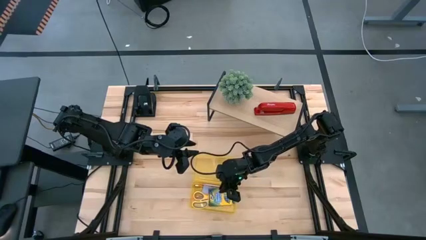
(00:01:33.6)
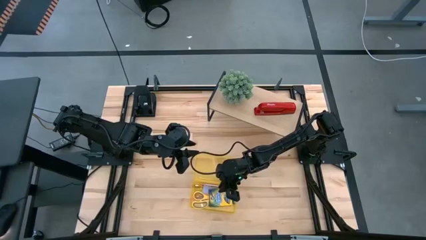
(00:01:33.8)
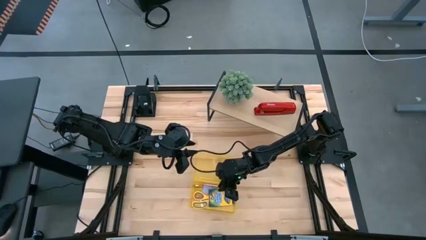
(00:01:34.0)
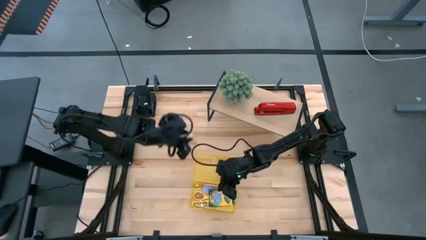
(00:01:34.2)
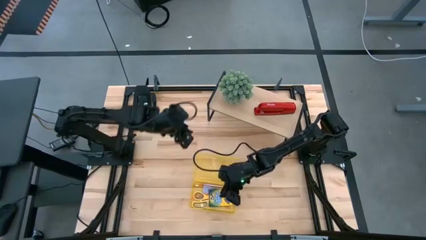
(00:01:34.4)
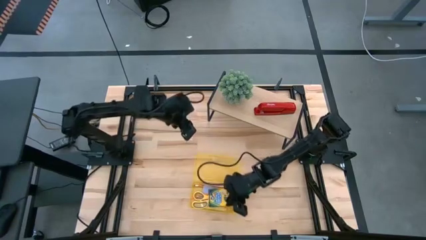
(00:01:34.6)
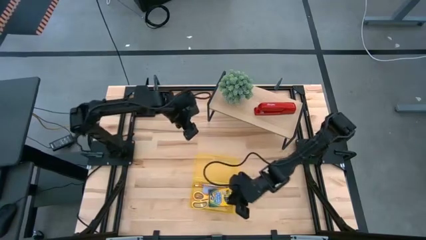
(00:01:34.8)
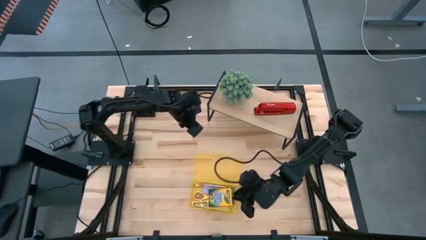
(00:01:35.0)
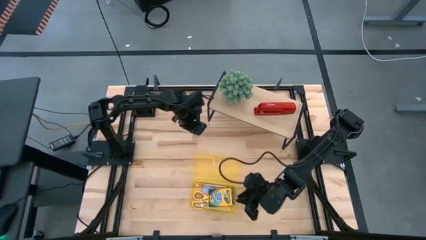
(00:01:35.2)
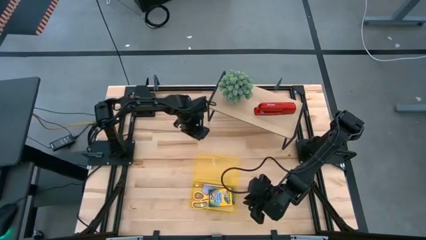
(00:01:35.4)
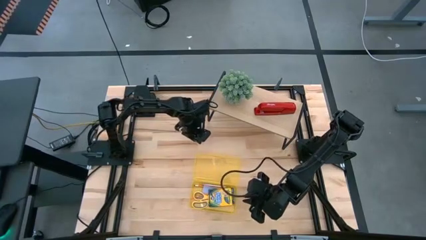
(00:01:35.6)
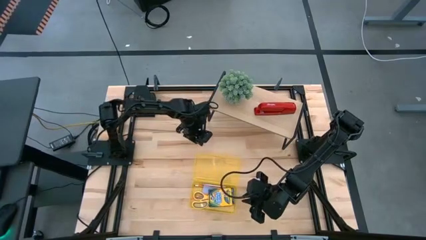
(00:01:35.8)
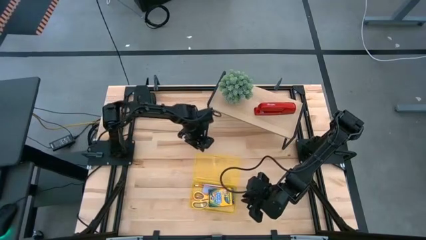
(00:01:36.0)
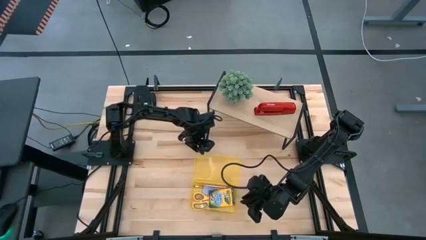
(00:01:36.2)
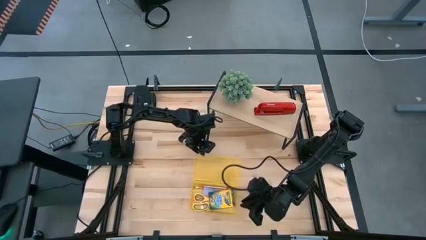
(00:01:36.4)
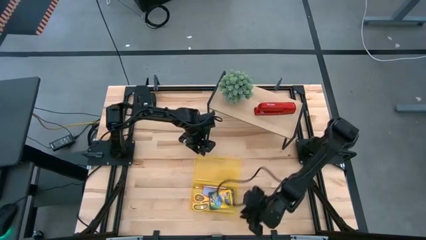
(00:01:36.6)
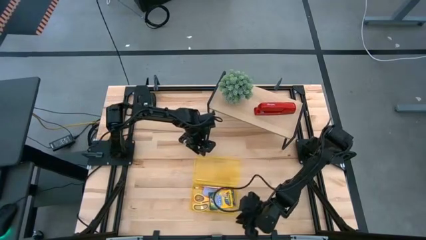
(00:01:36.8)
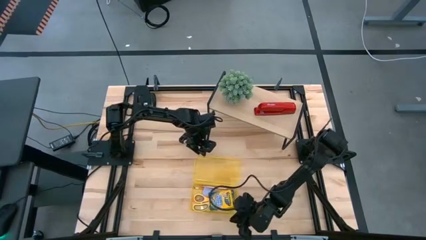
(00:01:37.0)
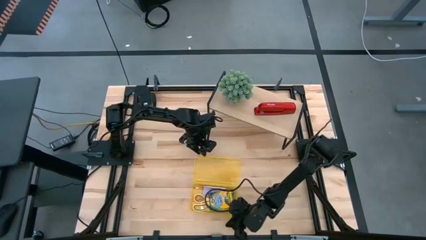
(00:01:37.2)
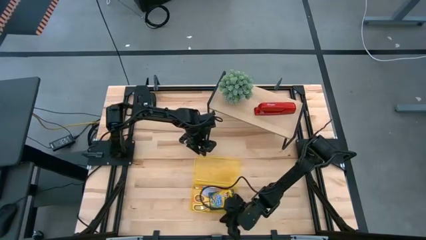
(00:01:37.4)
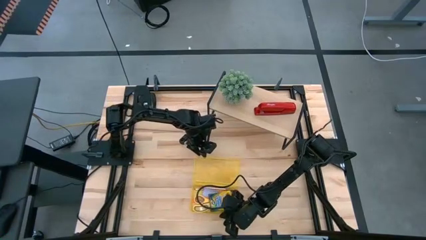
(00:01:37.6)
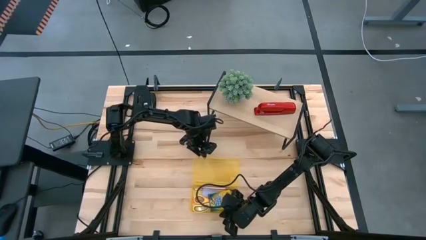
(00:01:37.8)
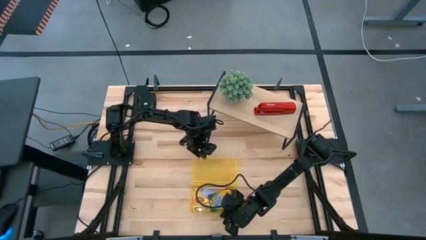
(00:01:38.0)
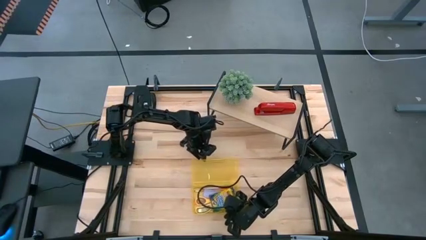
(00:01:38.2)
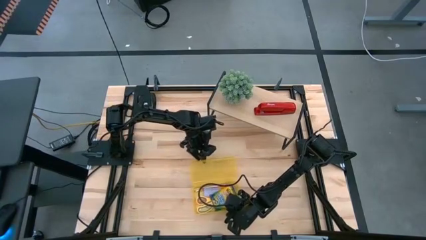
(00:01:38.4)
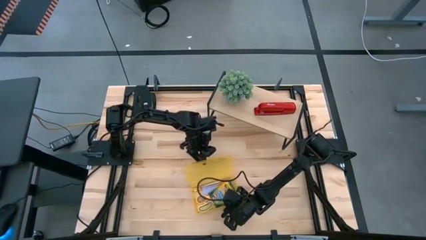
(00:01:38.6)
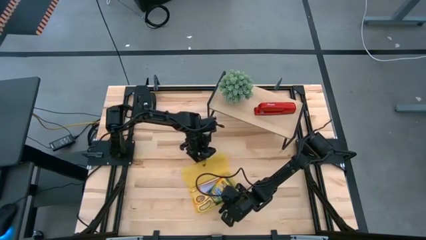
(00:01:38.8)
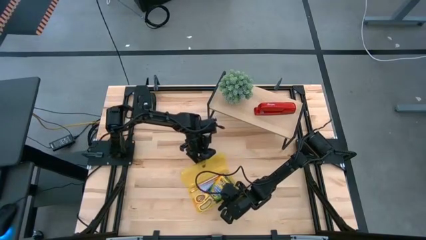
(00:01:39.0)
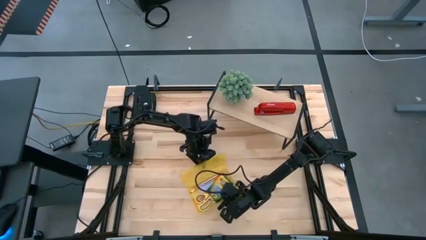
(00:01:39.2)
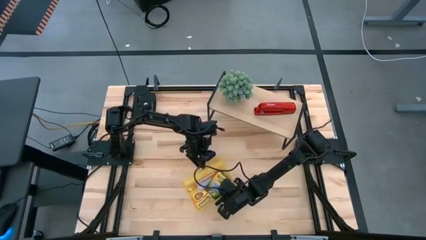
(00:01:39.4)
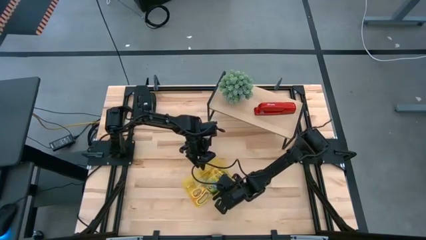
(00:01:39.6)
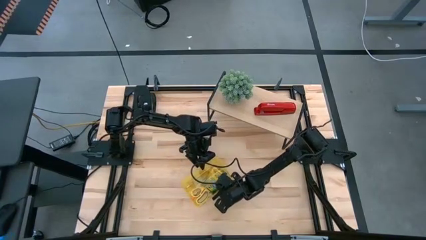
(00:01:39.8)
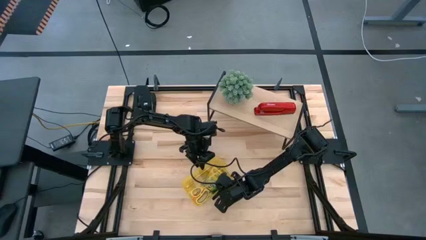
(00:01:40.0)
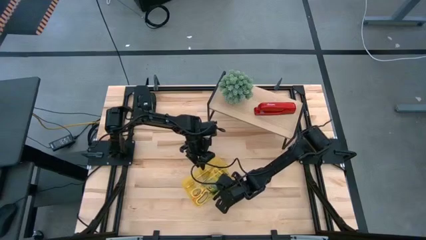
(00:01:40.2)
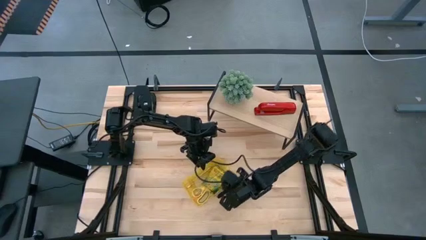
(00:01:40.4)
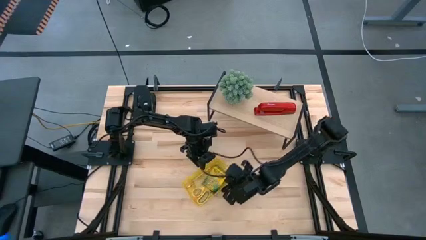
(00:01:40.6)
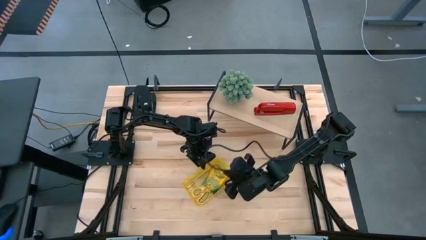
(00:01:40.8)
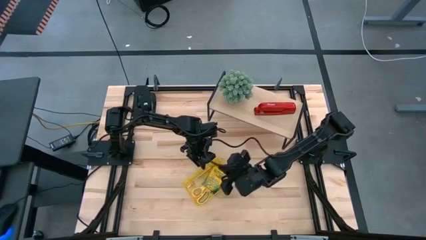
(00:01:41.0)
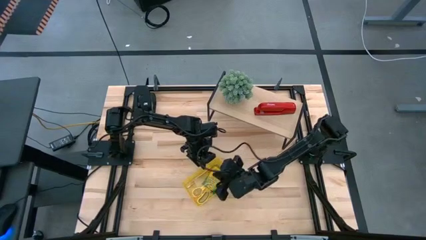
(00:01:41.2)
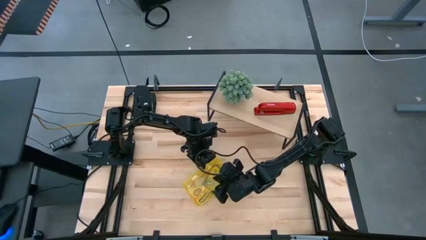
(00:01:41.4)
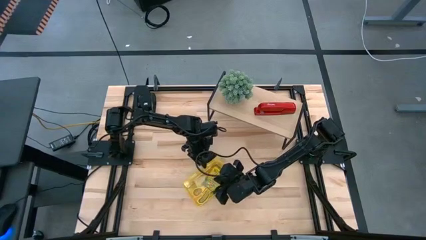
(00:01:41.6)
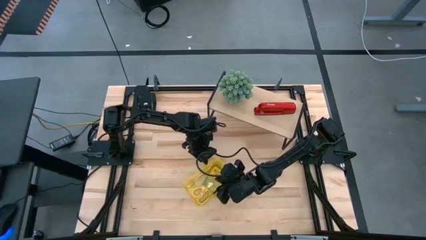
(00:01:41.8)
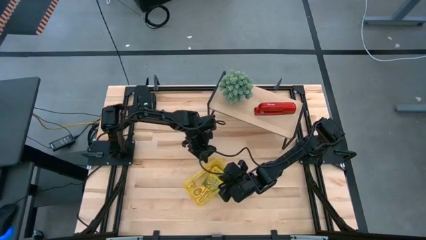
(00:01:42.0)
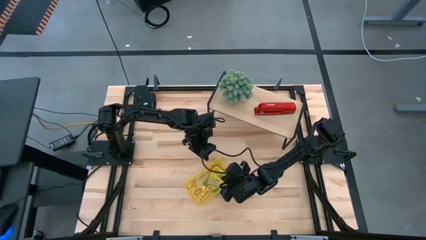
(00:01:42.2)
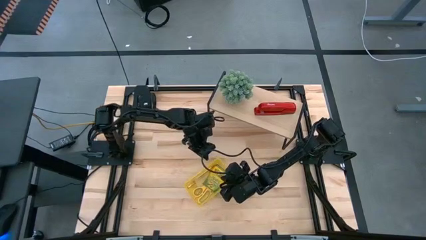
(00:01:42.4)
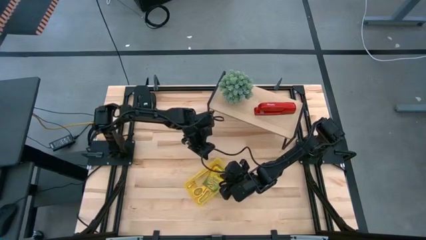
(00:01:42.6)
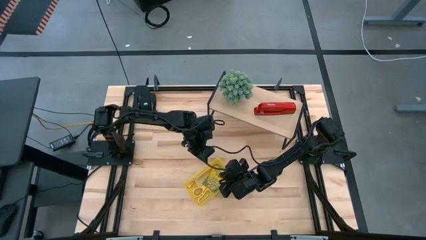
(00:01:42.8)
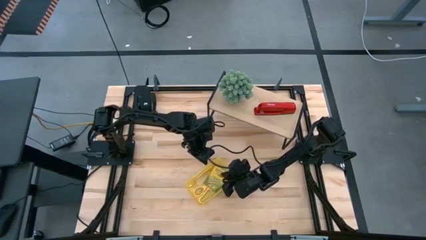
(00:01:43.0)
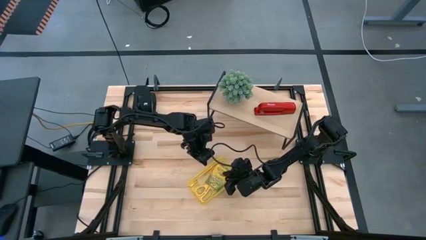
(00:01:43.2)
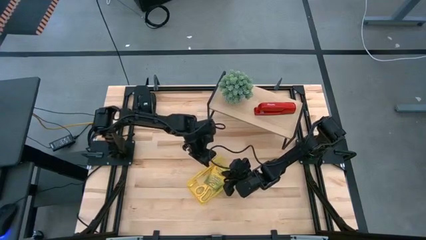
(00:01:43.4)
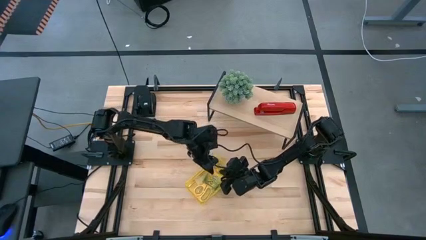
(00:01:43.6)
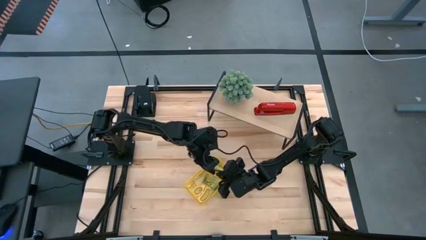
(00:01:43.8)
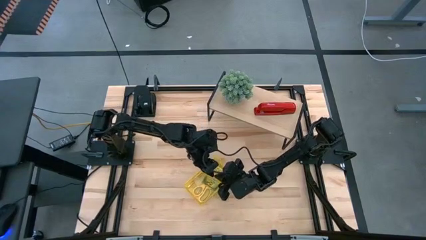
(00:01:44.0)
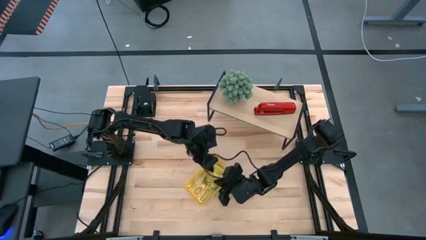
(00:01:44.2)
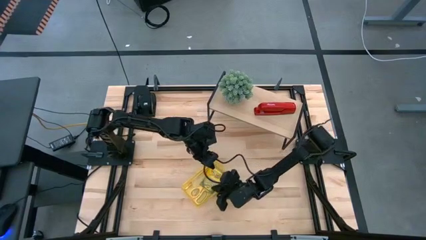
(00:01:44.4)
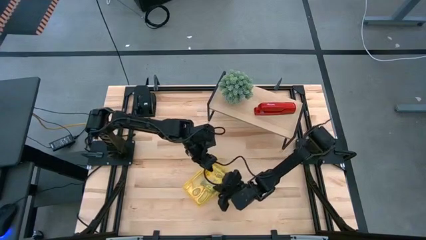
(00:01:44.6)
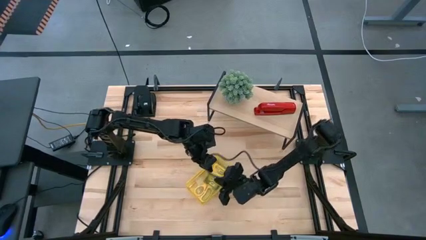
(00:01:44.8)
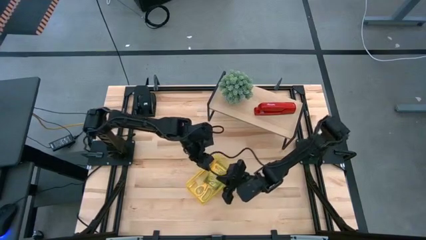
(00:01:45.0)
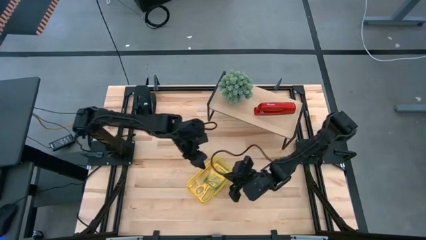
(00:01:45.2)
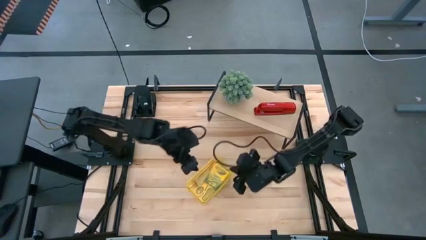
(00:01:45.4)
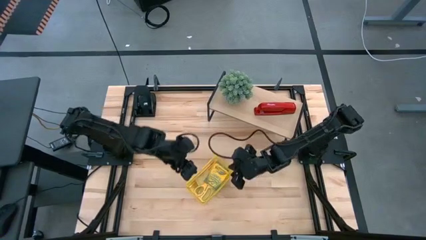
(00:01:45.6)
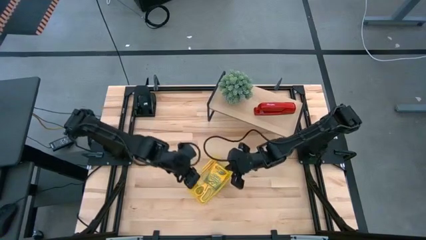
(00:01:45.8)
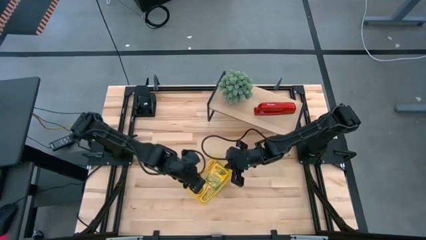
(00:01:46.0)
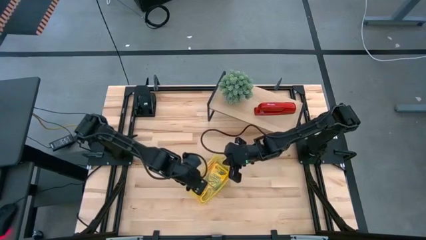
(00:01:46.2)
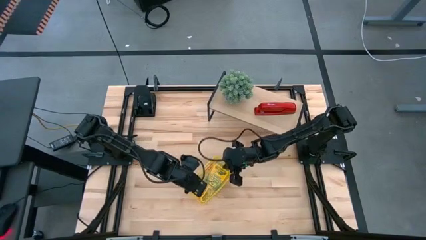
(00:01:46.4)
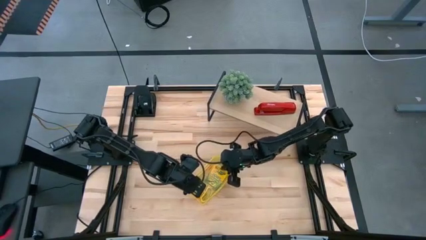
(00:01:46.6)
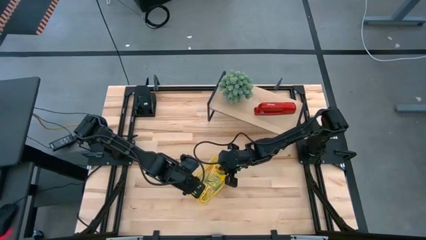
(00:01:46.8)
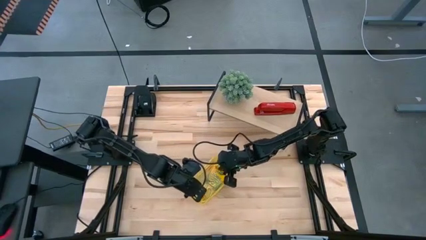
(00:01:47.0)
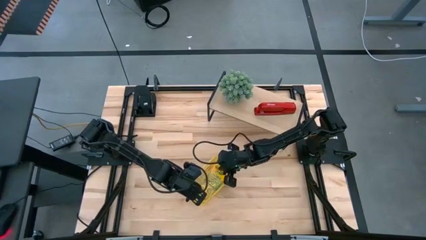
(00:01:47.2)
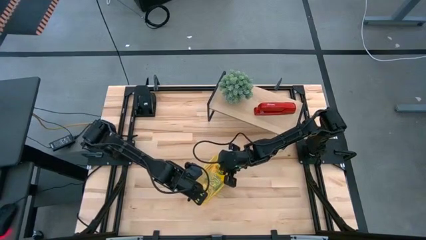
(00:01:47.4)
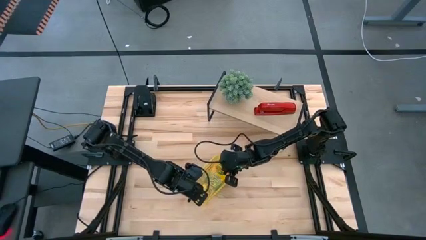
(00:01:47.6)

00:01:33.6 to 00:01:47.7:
Task: Pack school essentials
Close the supply box
